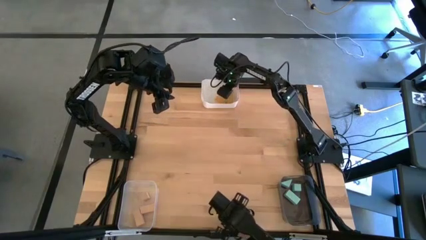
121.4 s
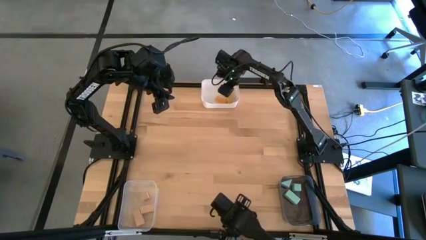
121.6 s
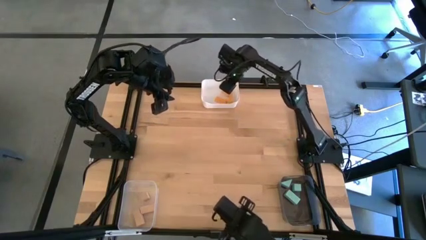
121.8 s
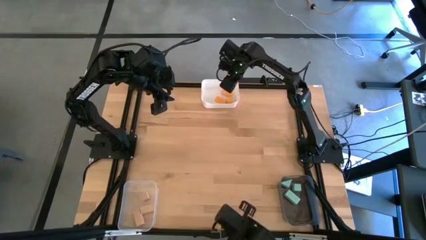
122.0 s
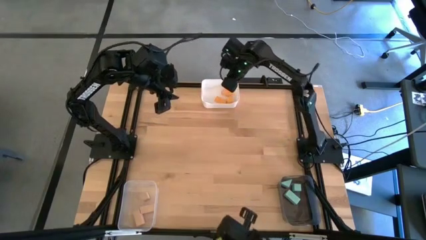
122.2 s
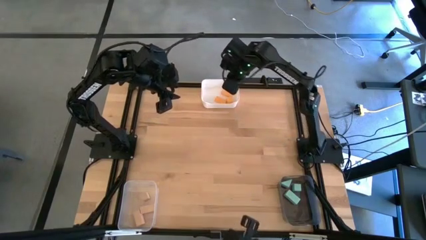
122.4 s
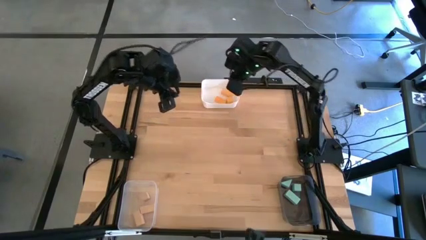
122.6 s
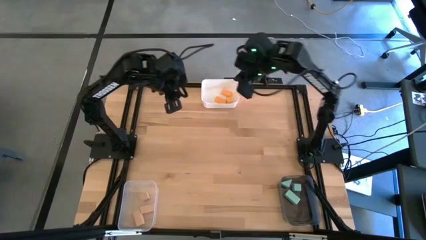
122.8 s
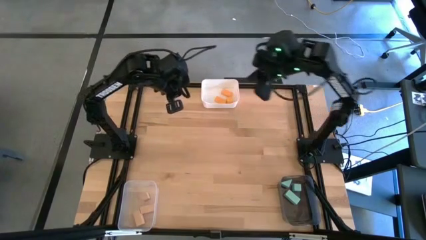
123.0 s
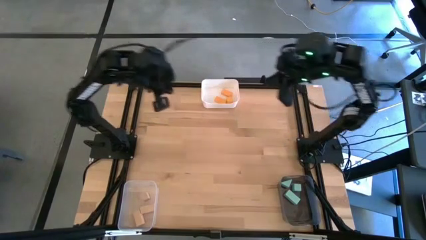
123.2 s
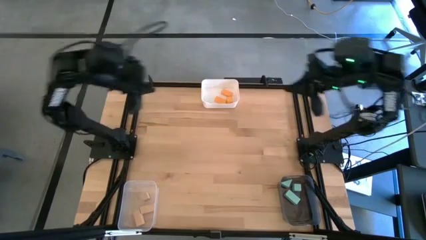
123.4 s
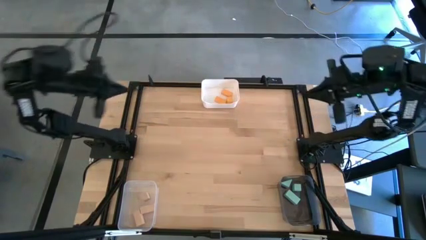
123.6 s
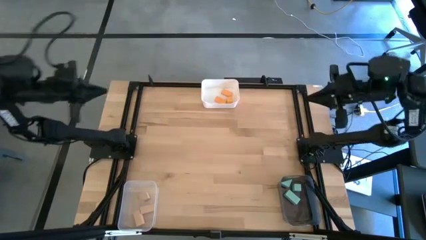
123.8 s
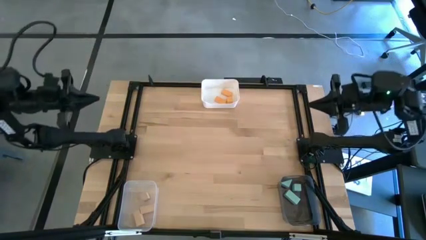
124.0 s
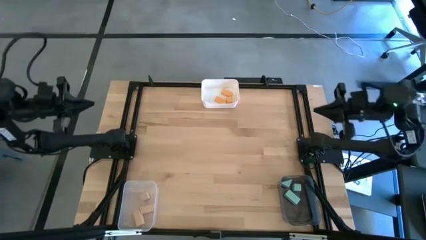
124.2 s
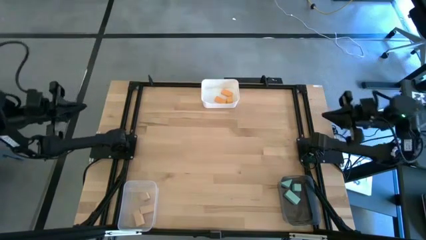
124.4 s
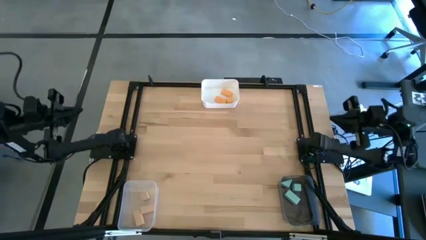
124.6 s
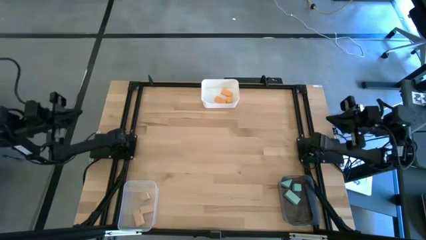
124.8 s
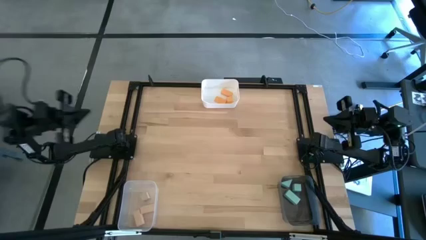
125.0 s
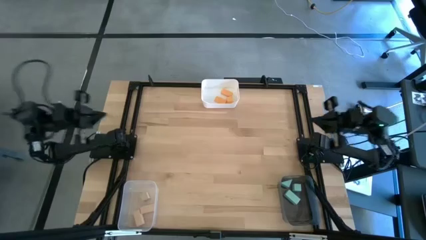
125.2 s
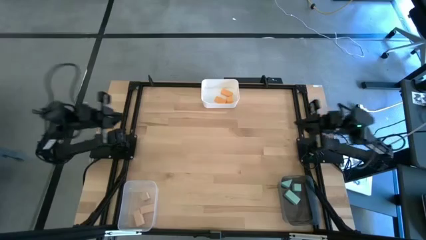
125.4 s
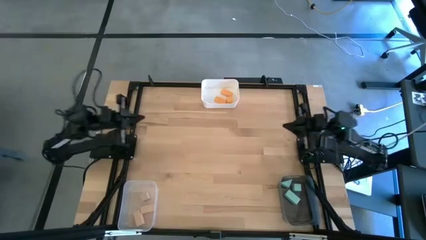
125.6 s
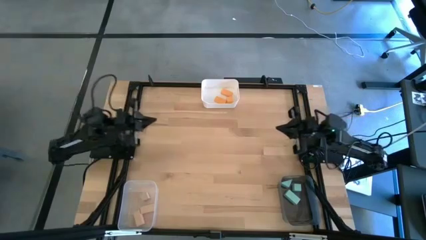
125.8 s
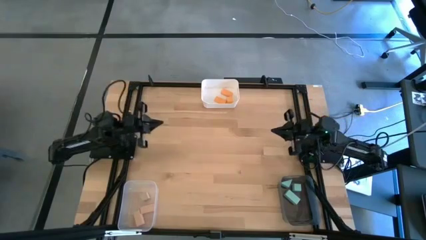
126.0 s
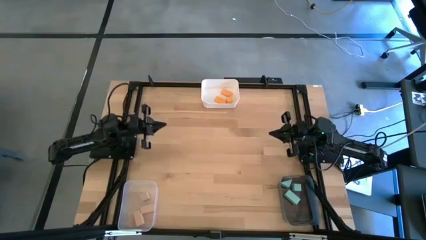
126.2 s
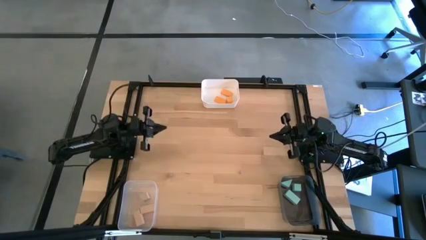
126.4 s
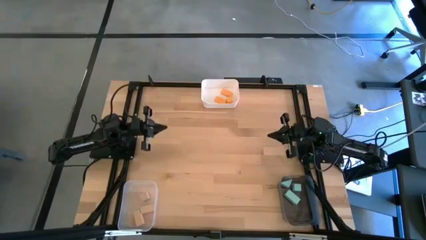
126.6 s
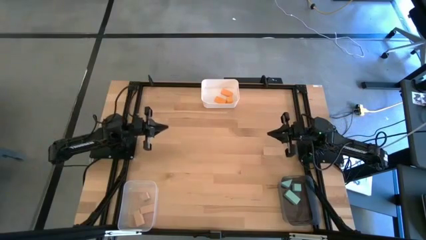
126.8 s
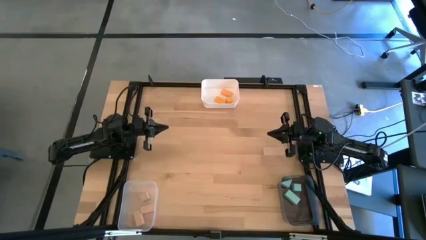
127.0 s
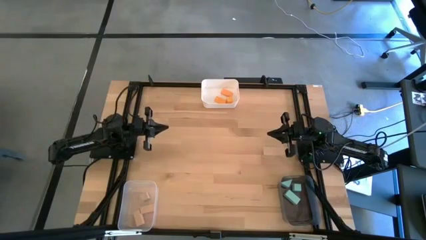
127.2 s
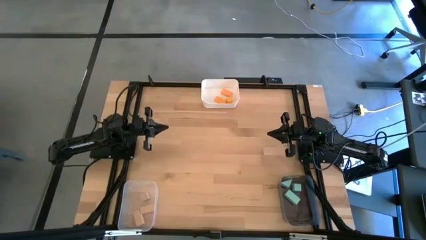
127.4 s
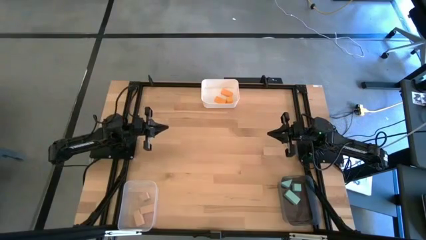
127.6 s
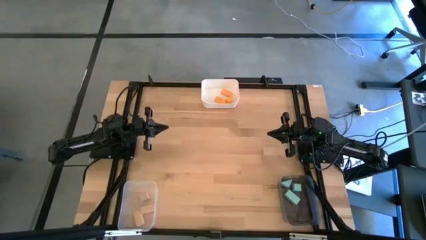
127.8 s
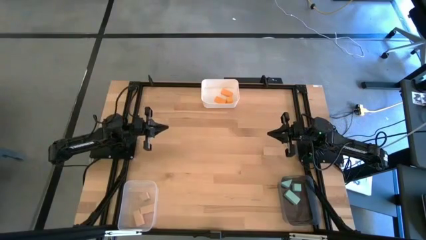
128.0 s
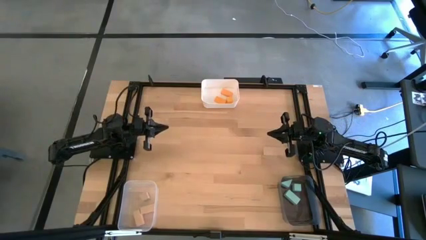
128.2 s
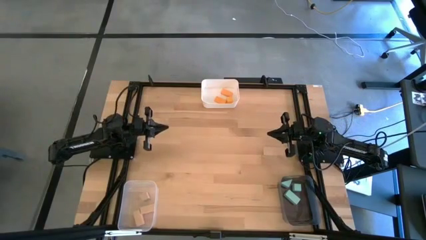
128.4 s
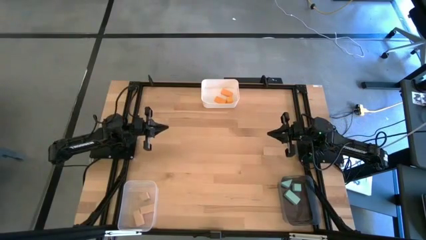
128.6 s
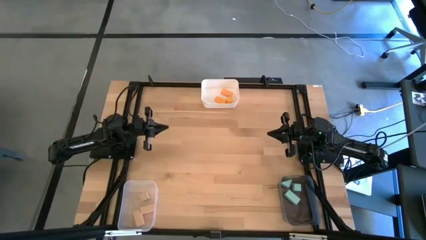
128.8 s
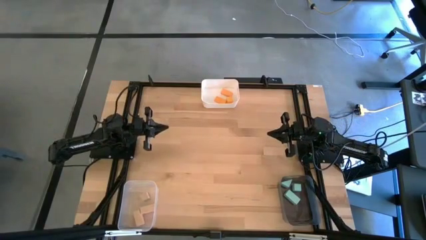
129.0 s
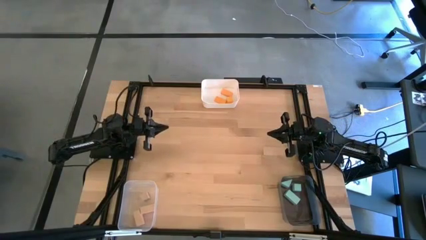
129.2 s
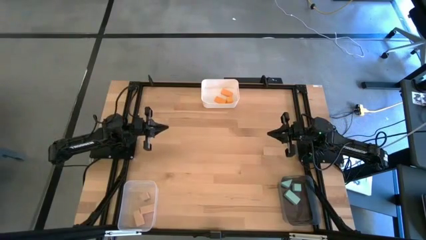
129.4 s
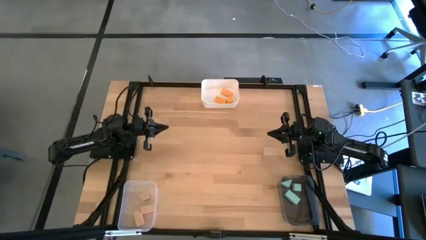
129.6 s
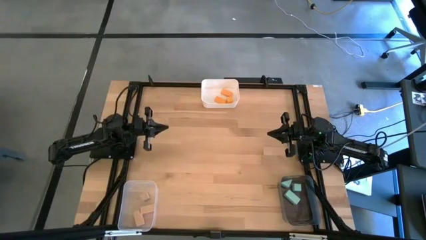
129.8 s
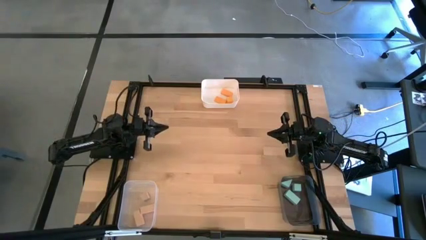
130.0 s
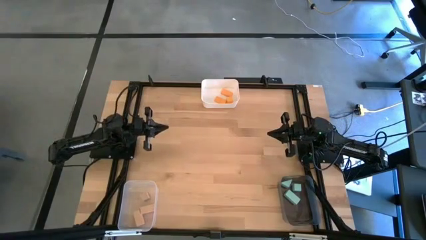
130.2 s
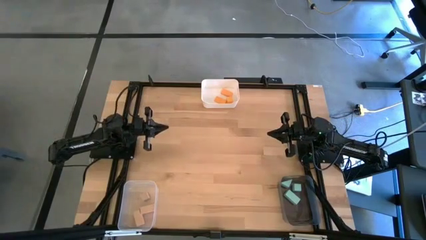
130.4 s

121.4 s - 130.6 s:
Task: Sort & place blocks by color
Return to Home Position

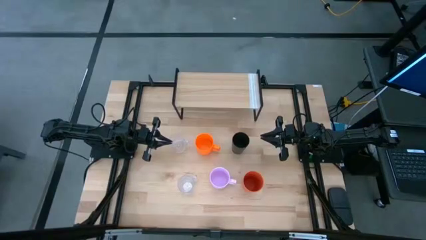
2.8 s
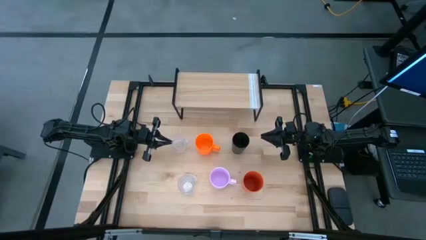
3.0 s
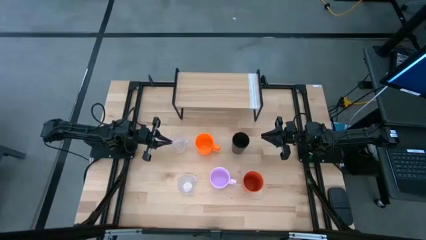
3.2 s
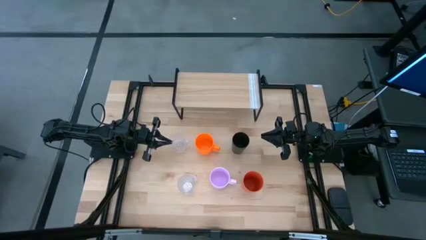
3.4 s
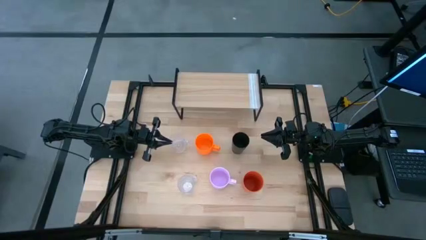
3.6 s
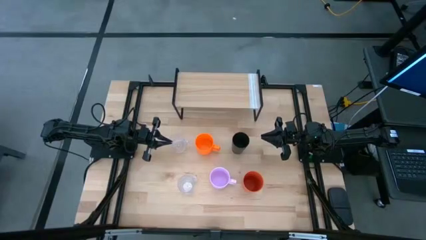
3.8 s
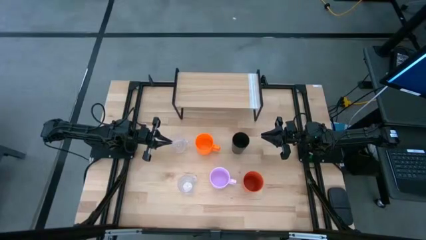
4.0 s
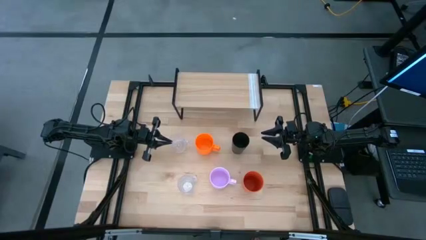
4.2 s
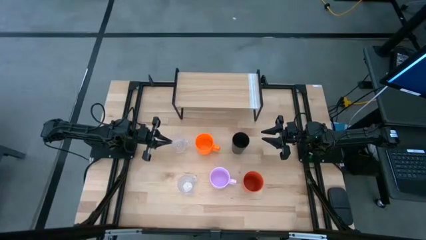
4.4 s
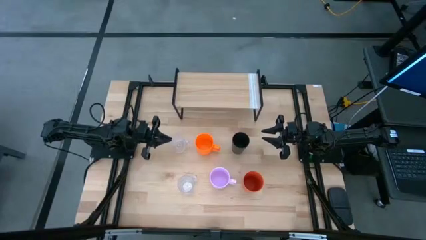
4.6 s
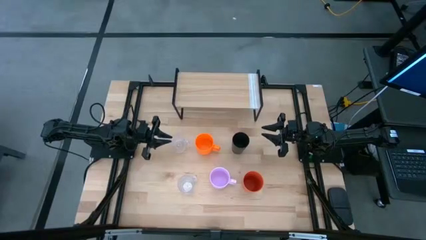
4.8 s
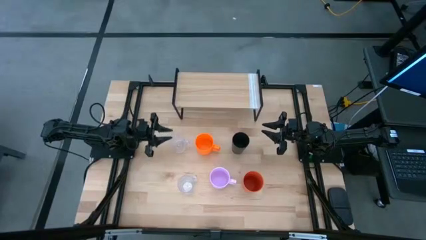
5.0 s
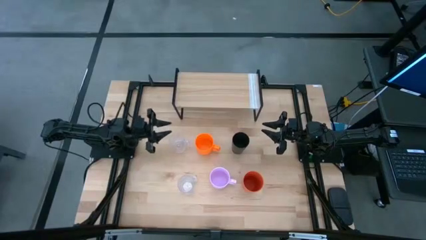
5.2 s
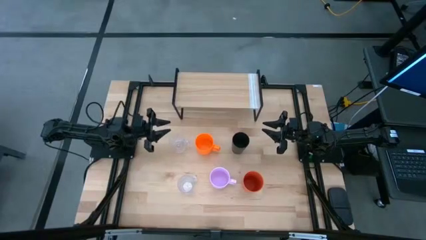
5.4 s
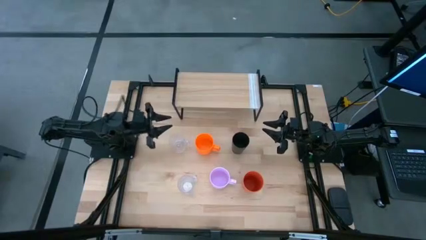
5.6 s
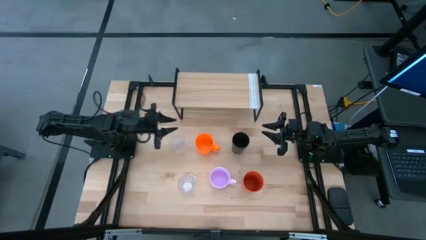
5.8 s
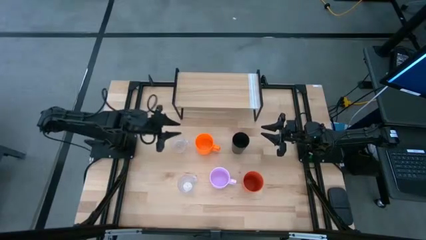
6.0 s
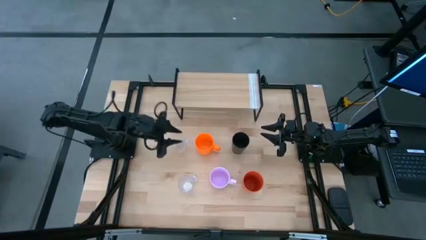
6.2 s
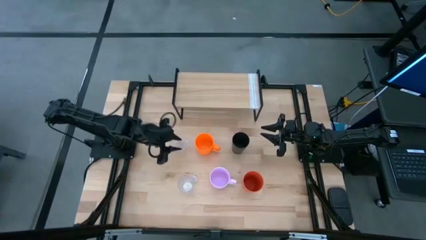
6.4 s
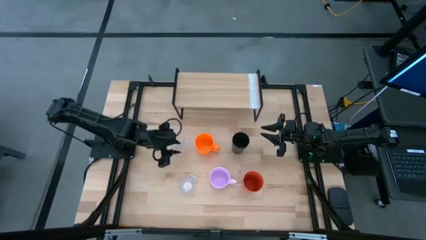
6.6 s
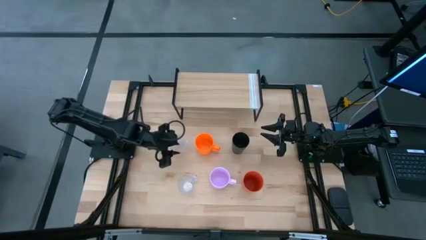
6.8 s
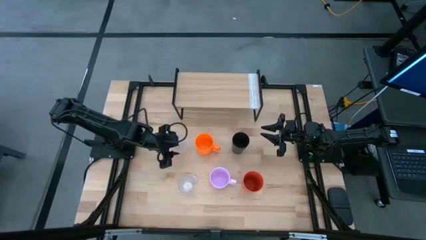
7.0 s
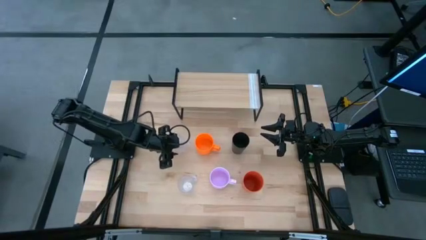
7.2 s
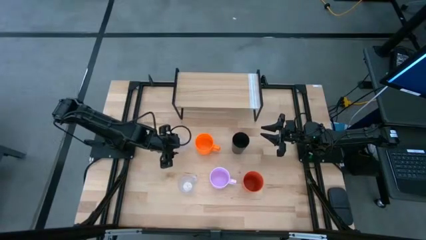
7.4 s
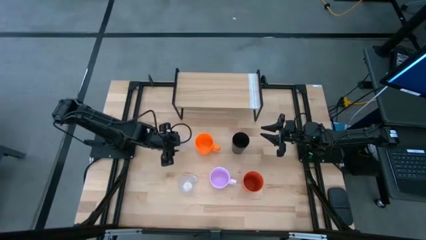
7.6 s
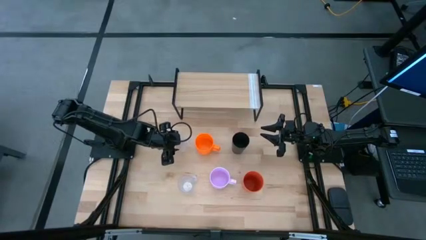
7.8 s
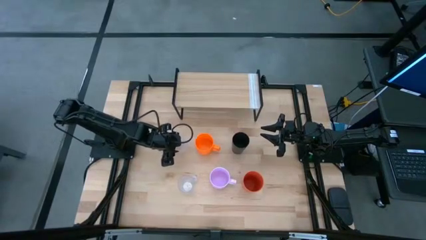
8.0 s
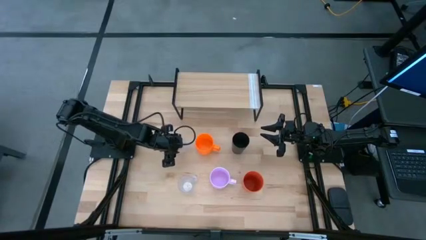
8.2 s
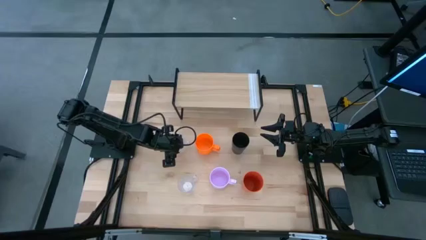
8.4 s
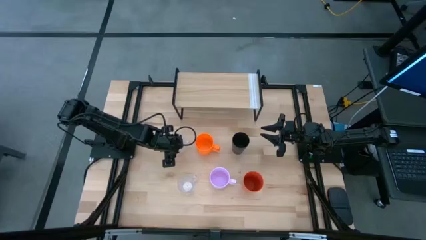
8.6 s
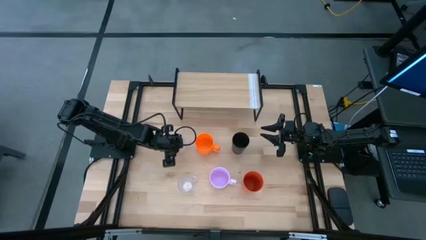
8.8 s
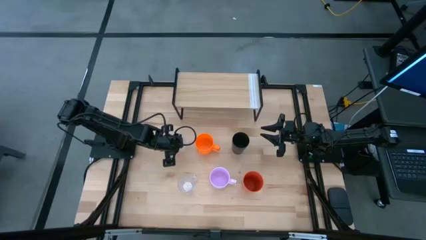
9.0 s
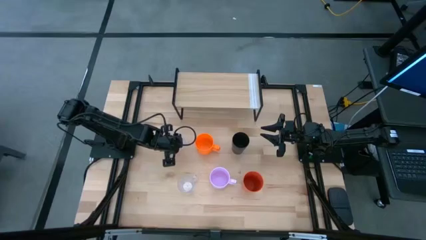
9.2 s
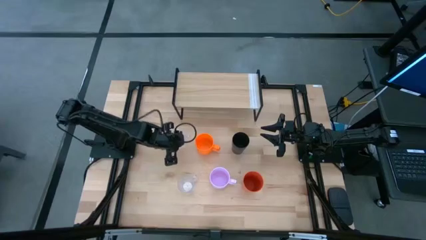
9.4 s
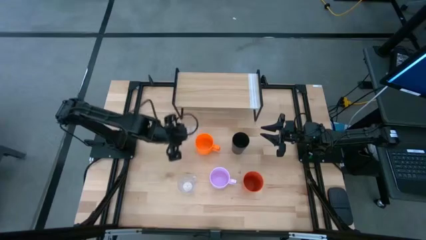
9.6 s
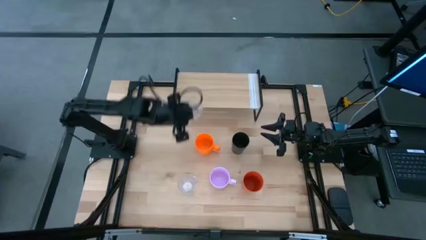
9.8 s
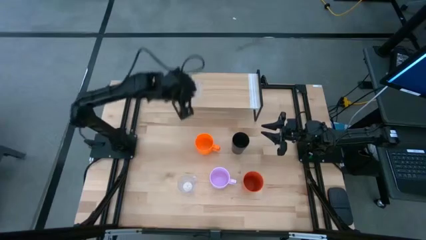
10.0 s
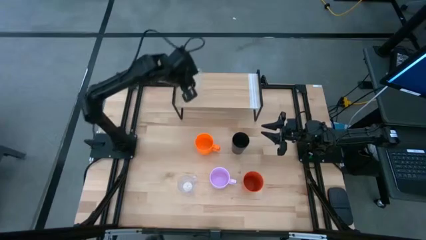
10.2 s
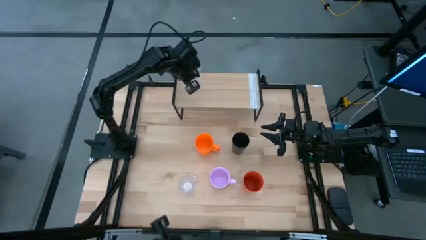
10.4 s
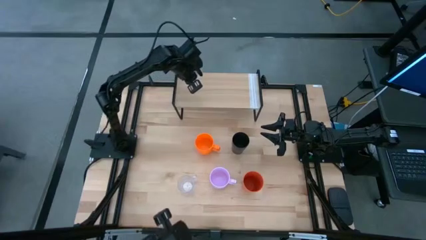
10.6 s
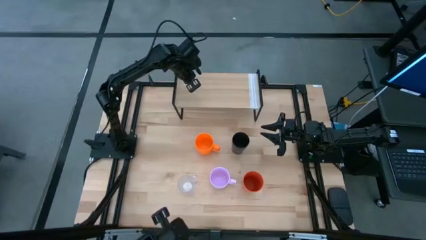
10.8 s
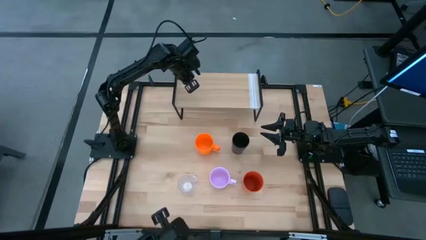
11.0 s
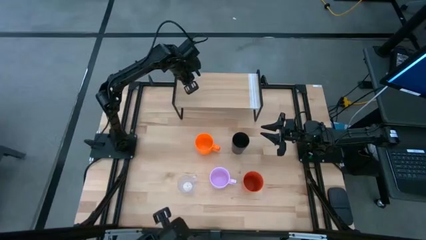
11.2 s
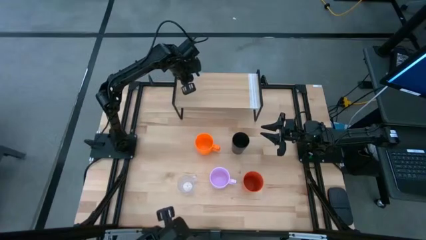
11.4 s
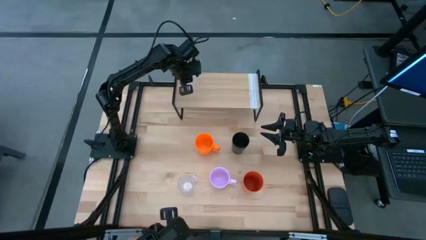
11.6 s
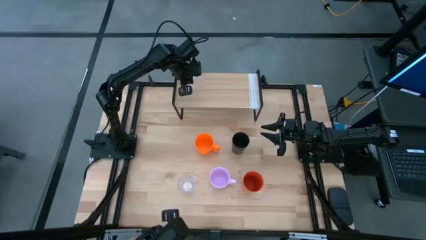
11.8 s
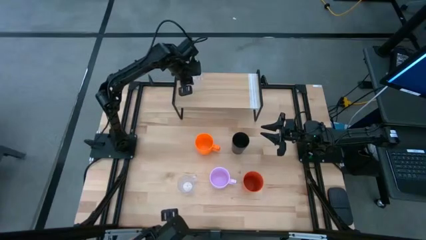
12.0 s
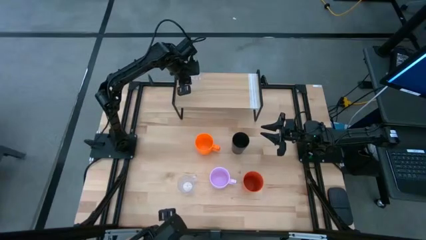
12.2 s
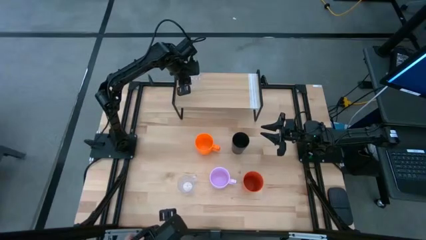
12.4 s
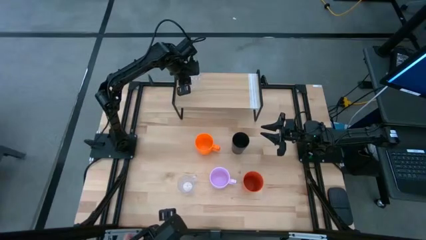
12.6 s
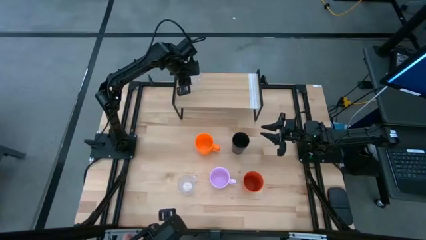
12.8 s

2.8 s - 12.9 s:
Task: Stack small to large cups/mugs on shelf
Put the top transparent mug on top of the shelf
